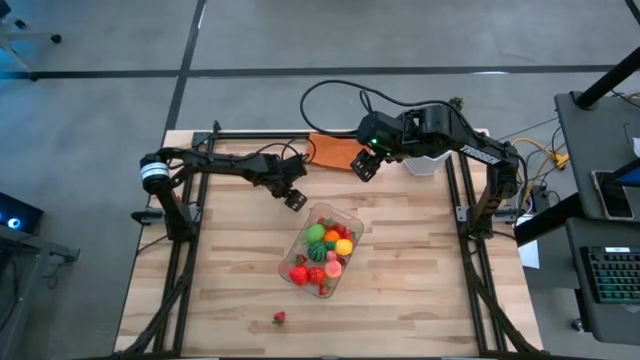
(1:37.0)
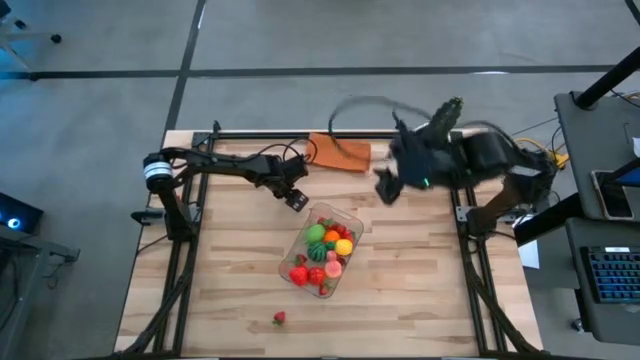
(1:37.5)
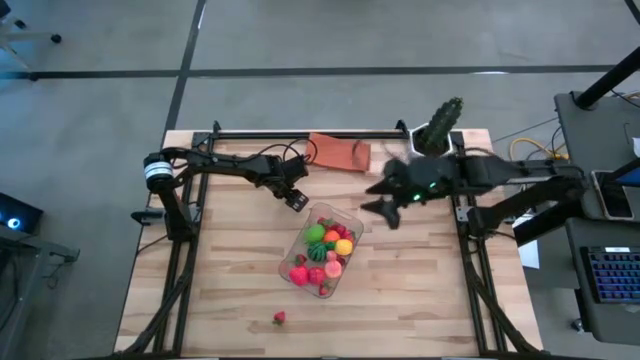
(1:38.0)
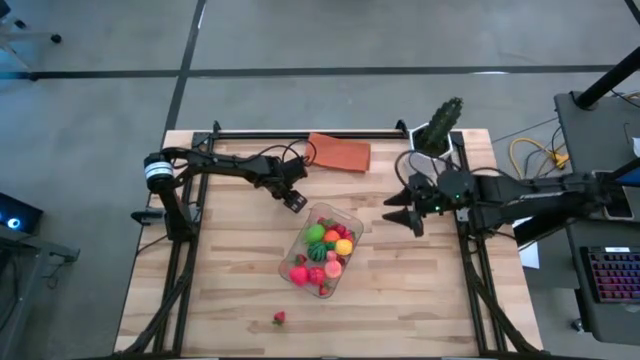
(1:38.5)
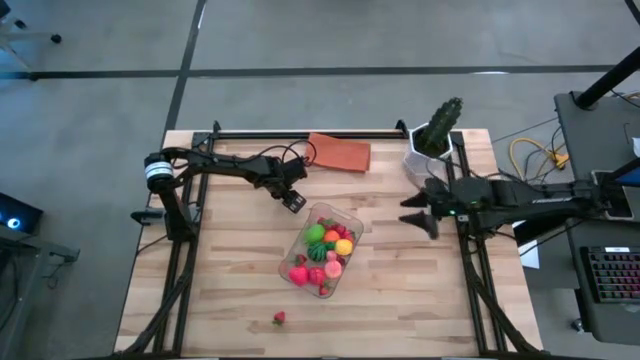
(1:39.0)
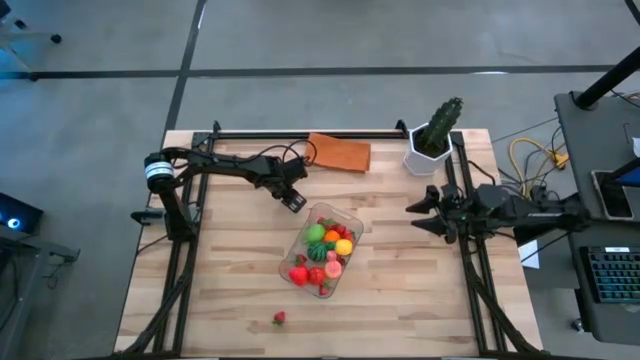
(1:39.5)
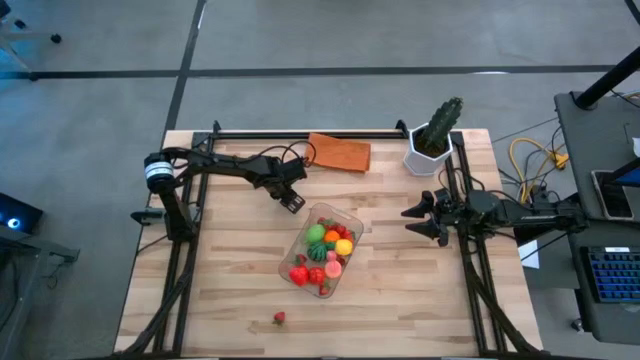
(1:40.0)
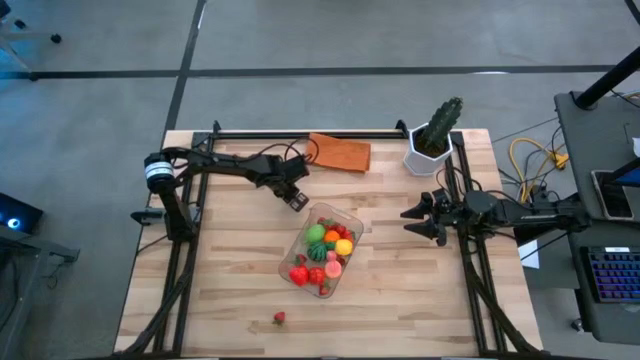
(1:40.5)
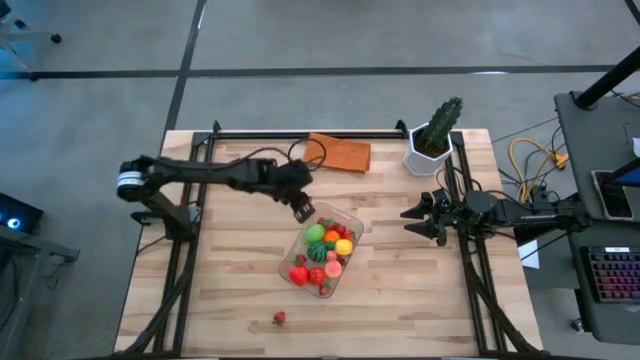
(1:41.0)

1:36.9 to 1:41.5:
Task: Pick and placing Produce into tupperware
Put the cherry into the transparent bin

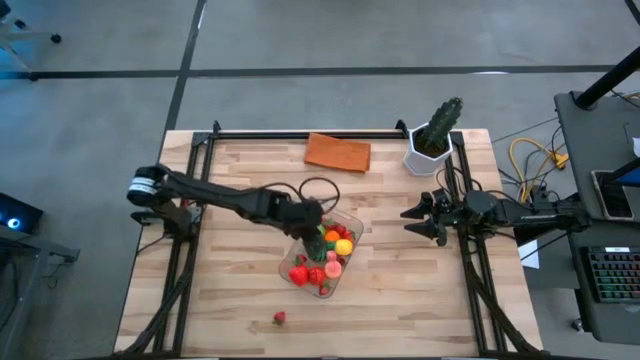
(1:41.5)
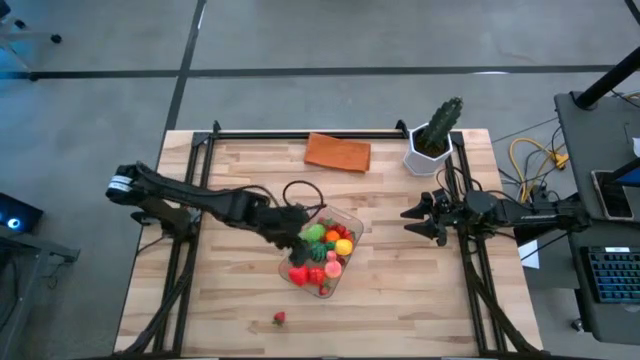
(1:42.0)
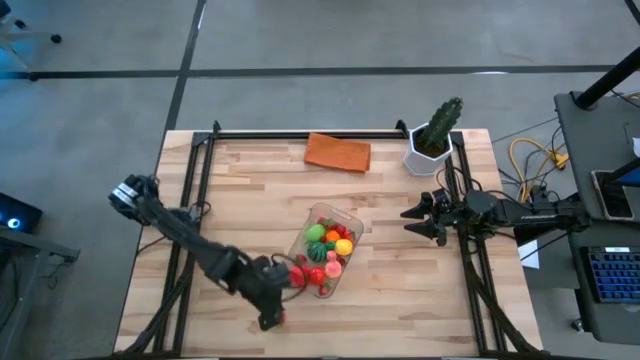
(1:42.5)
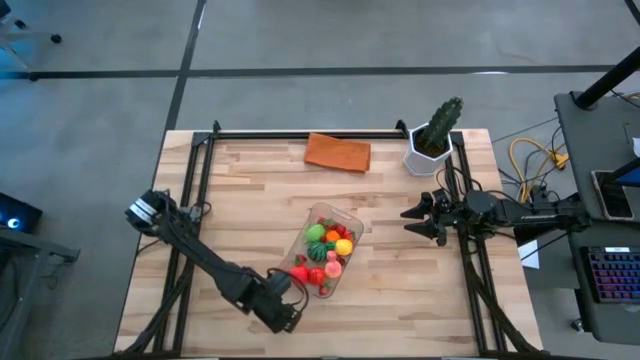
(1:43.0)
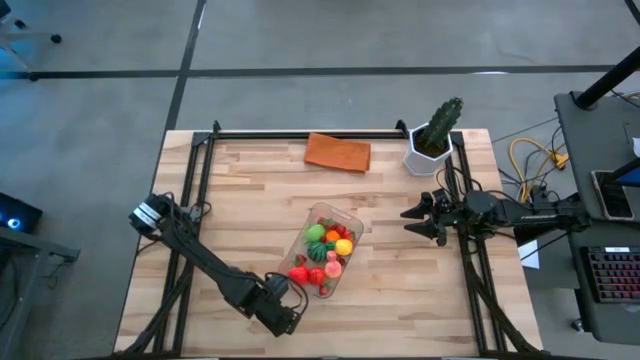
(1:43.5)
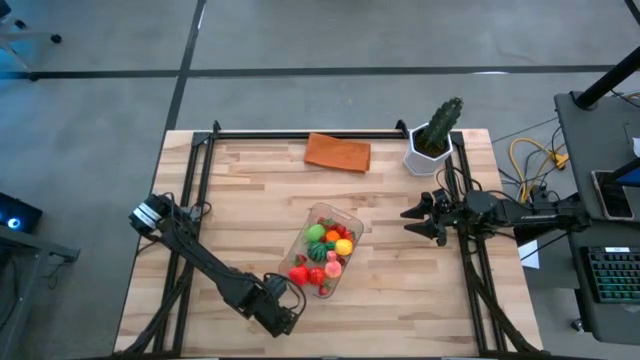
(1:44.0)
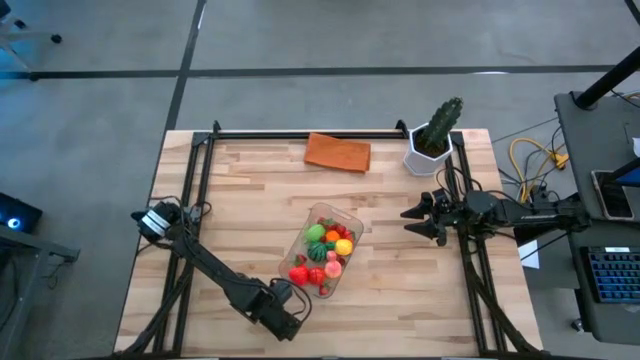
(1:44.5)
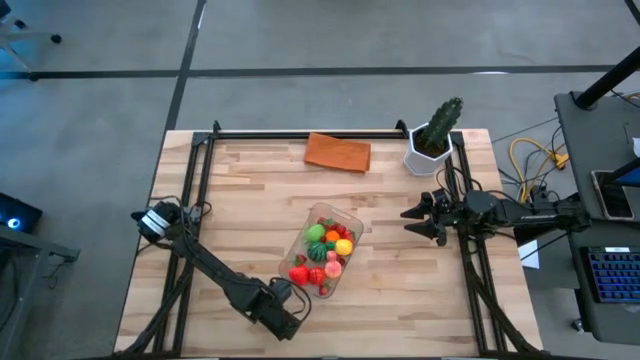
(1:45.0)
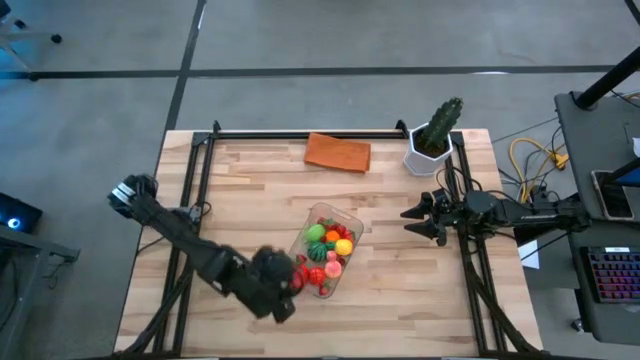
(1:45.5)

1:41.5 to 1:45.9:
Put the strawberry into the transparent bin

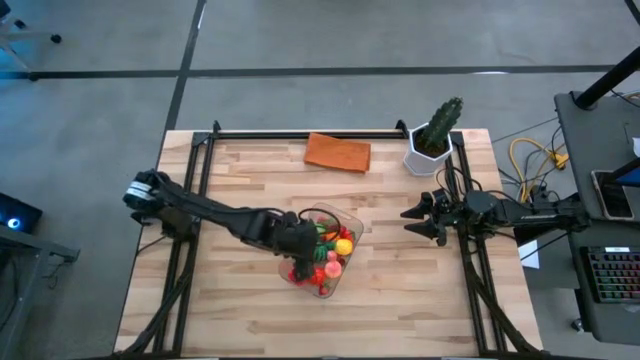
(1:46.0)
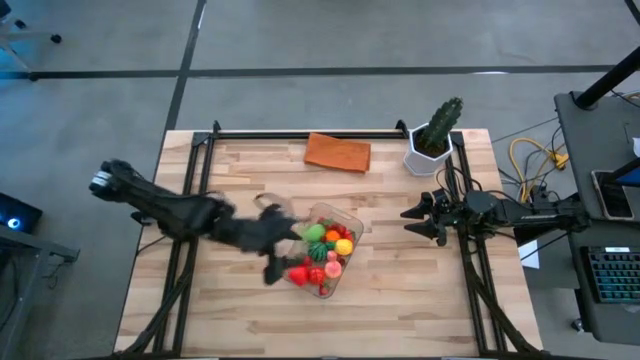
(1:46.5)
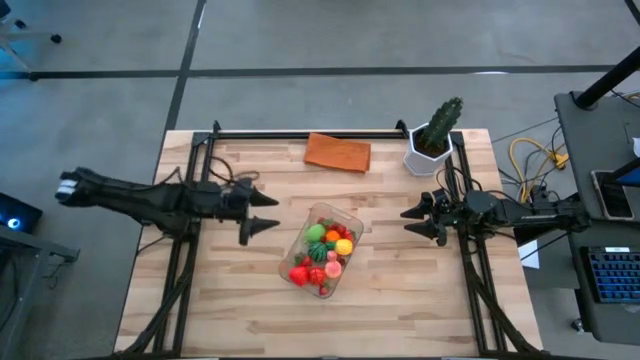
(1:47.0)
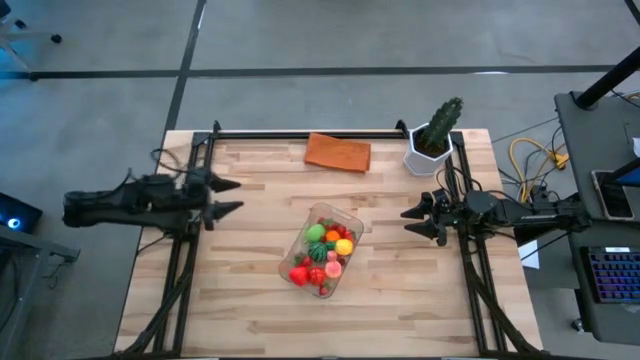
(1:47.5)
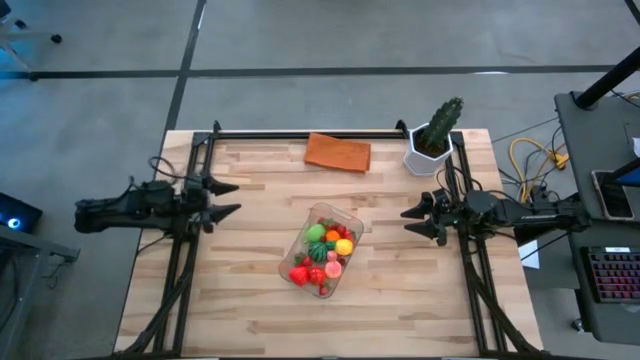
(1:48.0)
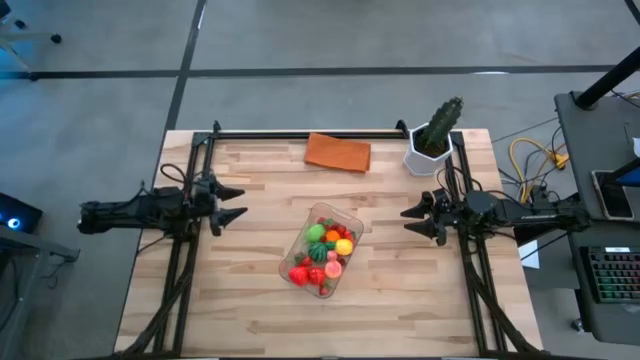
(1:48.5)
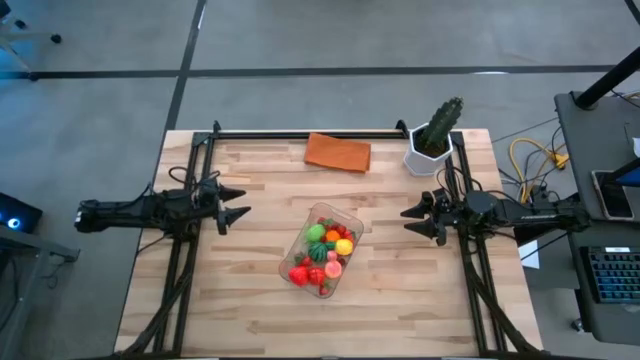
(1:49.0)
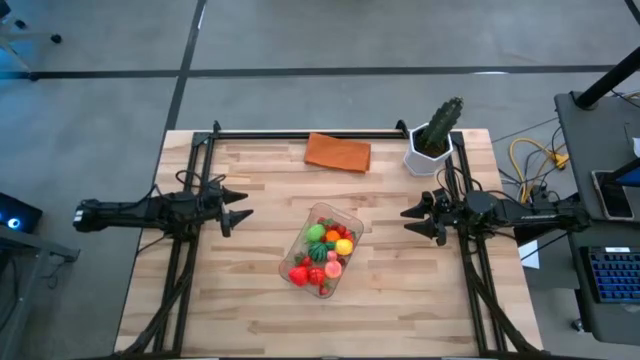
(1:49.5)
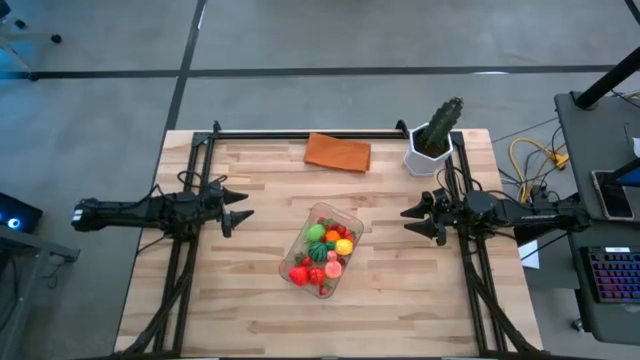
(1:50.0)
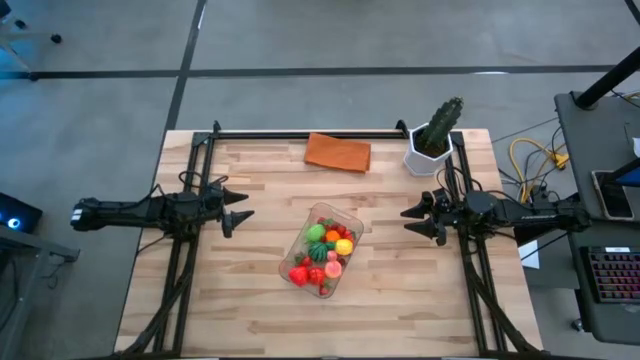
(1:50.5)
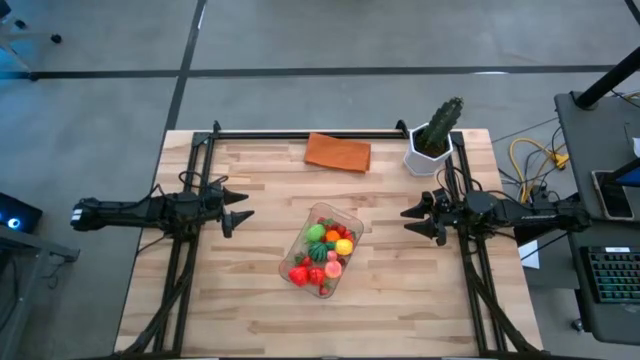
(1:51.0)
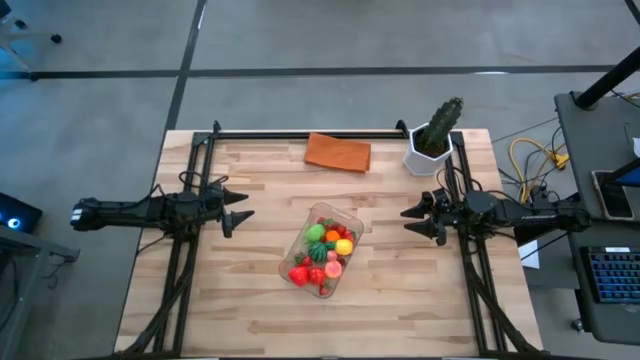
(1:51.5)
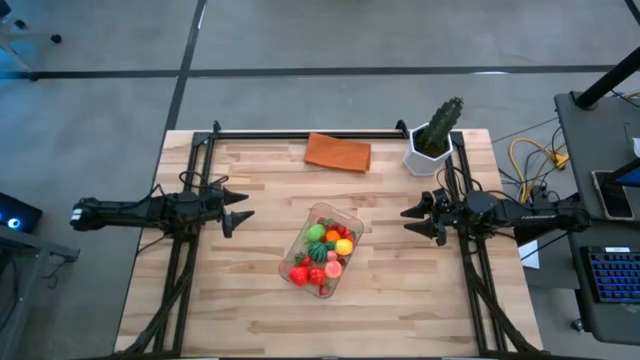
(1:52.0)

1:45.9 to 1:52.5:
Return to Home Position

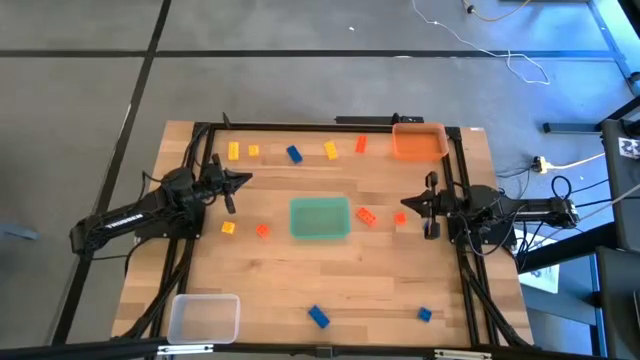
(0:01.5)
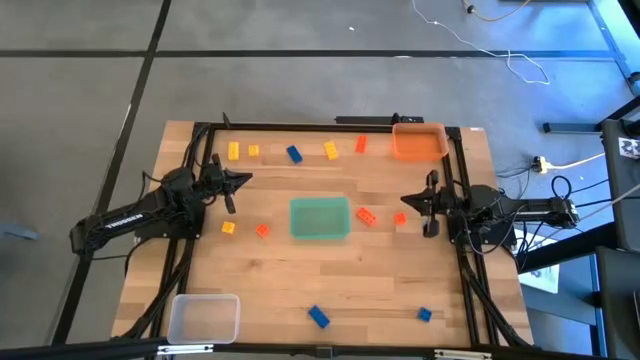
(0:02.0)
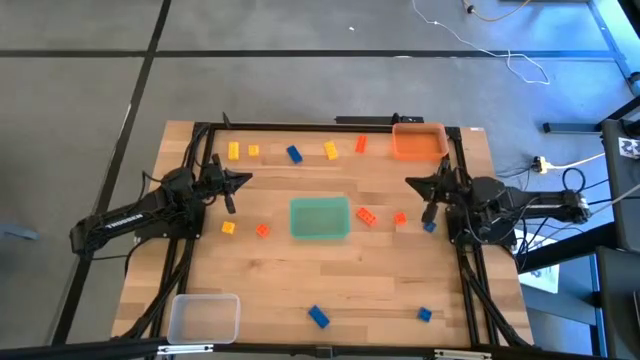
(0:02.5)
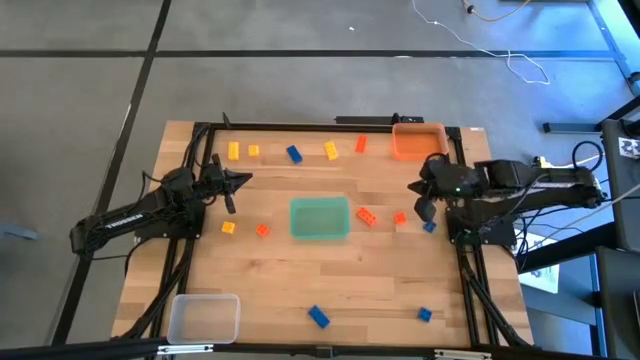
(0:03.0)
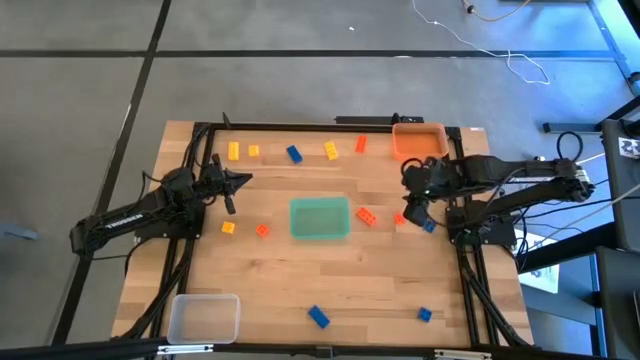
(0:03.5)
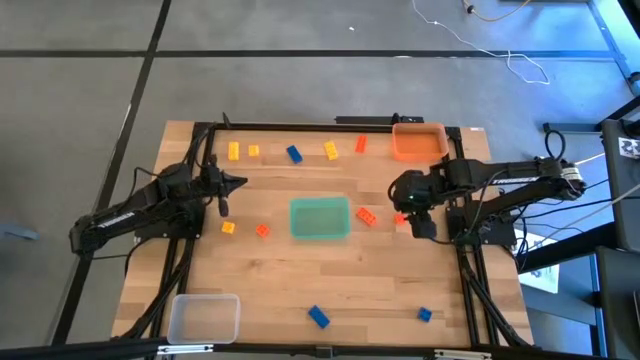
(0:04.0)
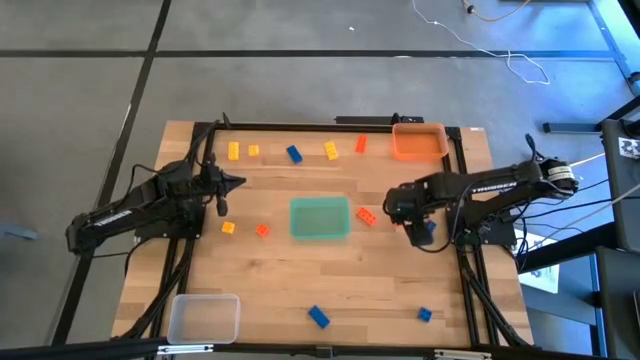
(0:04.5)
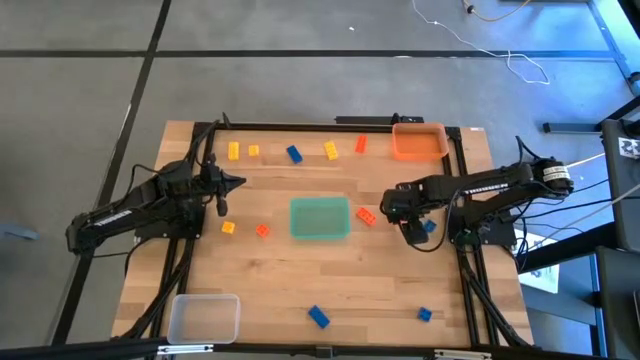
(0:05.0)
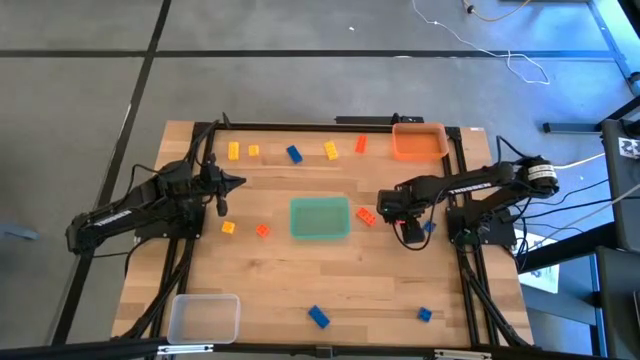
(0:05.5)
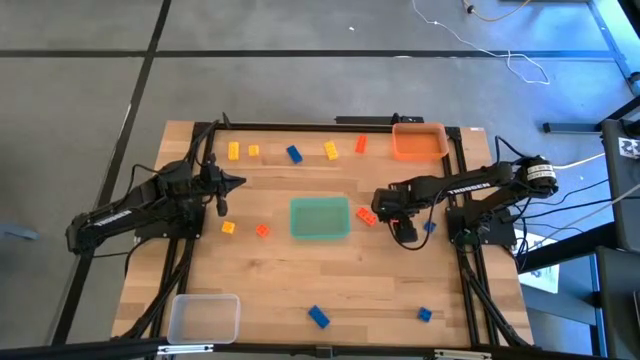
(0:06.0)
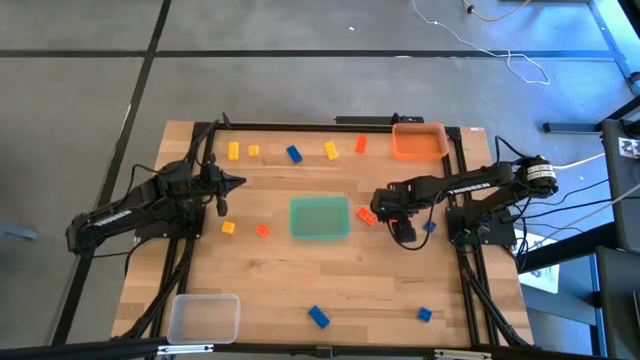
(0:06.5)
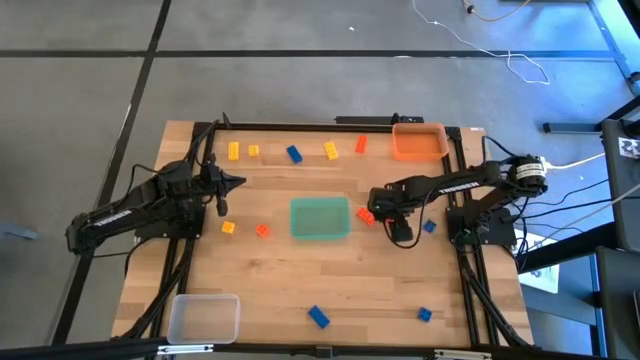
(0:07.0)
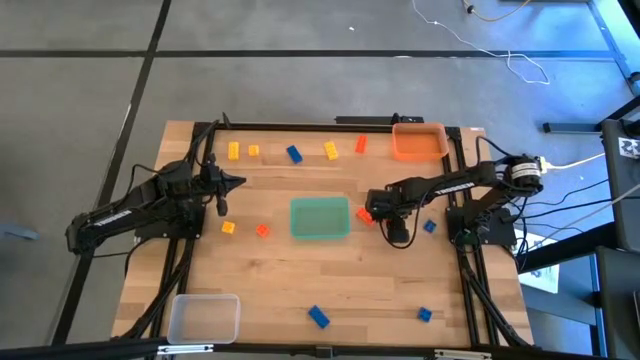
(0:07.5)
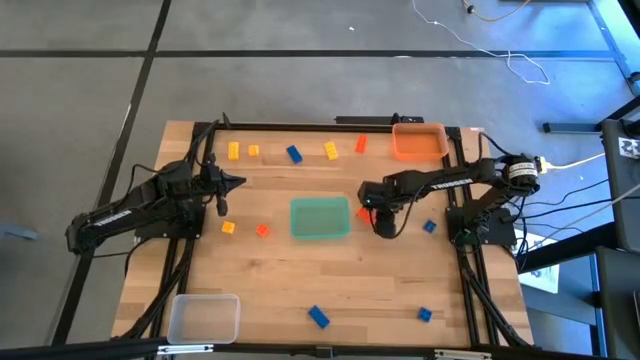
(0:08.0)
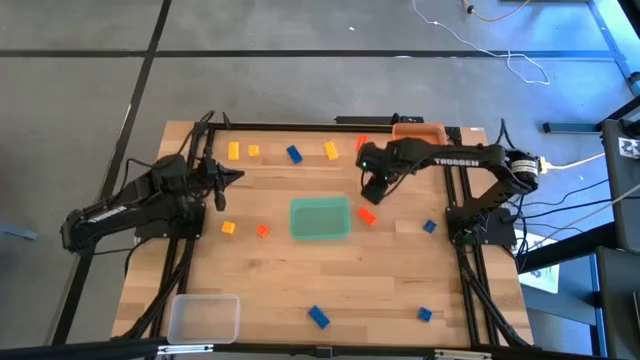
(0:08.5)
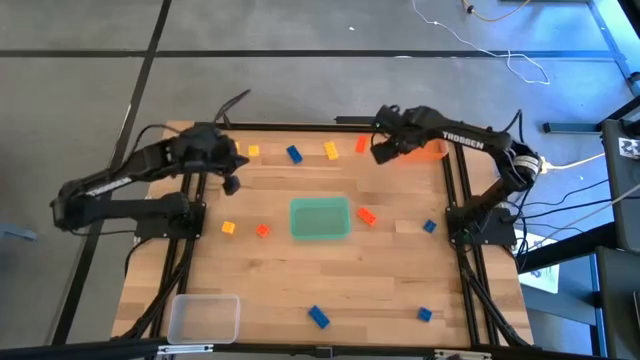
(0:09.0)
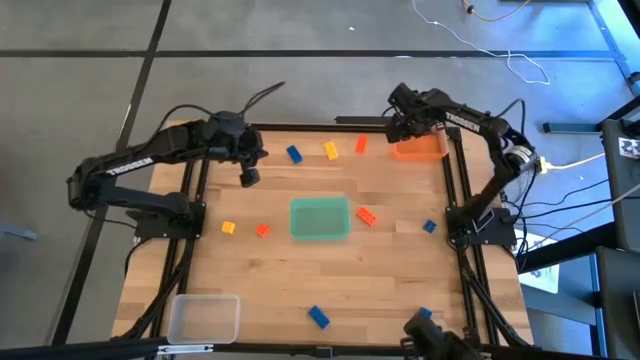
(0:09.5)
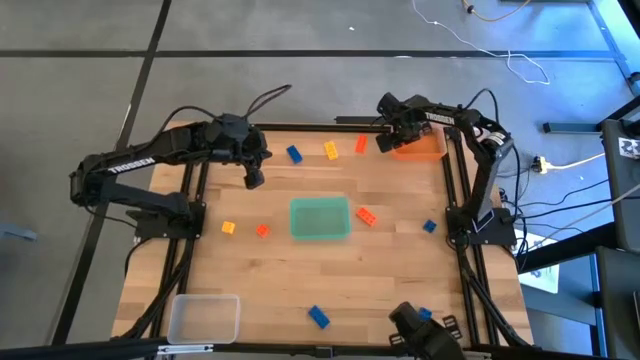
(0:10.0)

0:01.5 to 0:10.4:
Task: Sort & place blocks by color
Put the orange game piece into the orange bin
